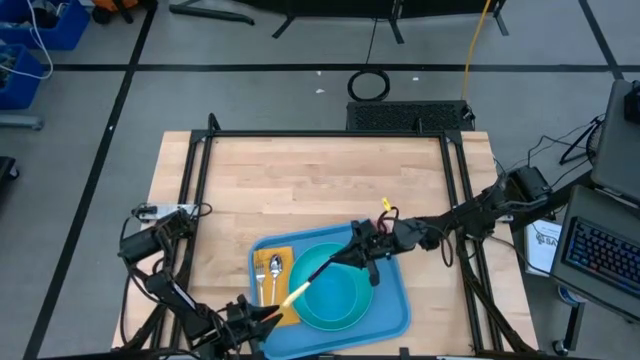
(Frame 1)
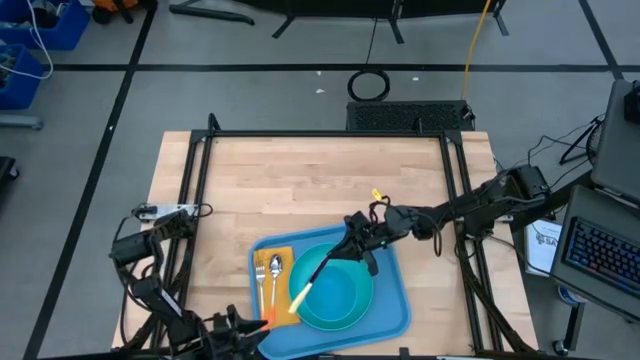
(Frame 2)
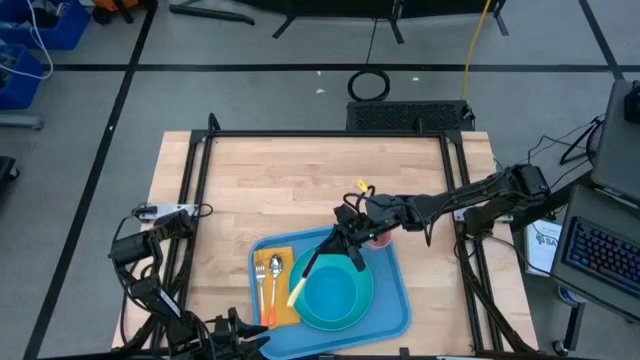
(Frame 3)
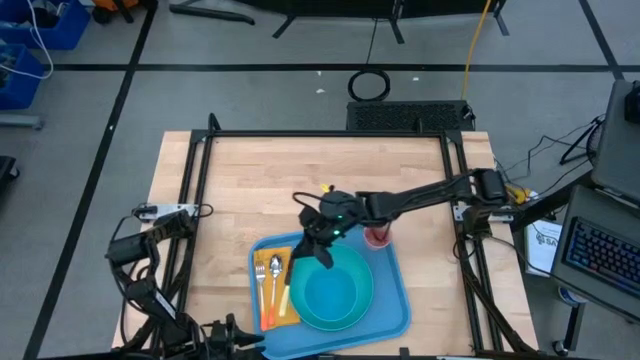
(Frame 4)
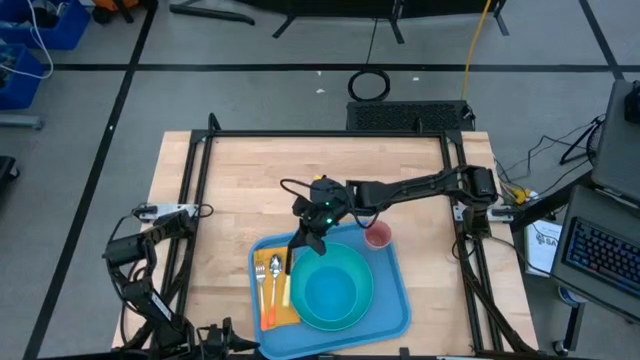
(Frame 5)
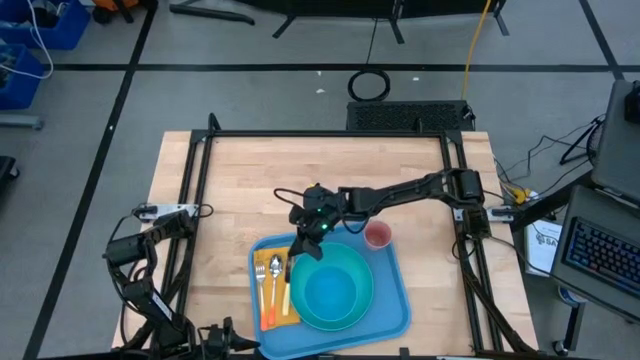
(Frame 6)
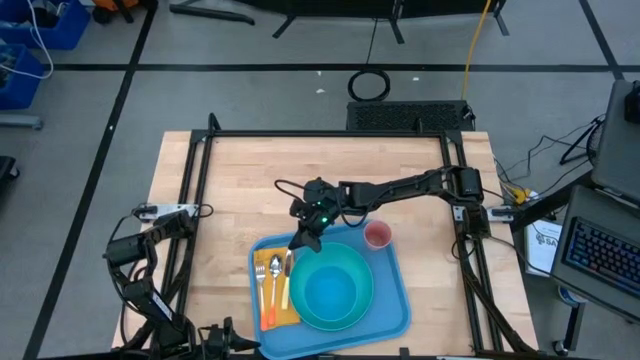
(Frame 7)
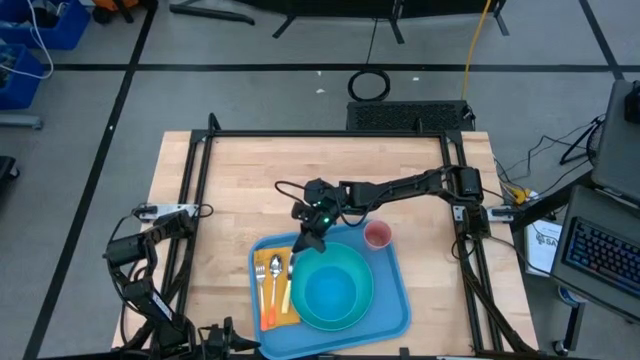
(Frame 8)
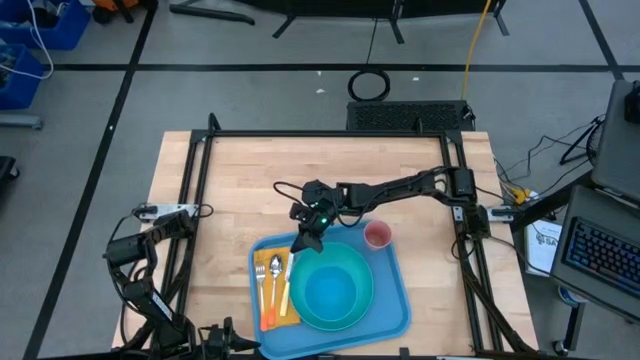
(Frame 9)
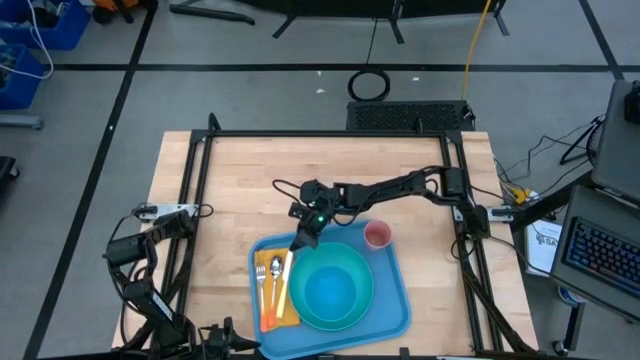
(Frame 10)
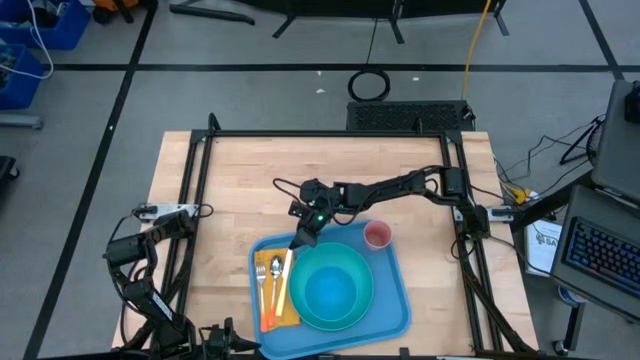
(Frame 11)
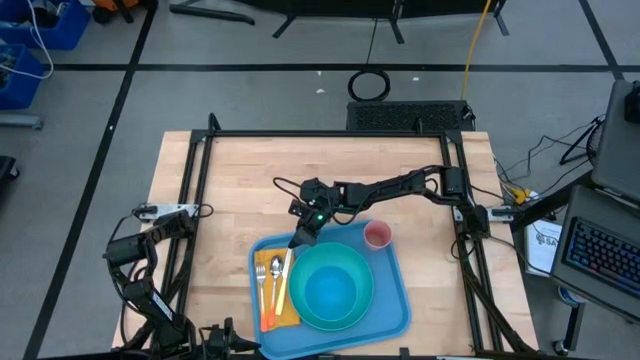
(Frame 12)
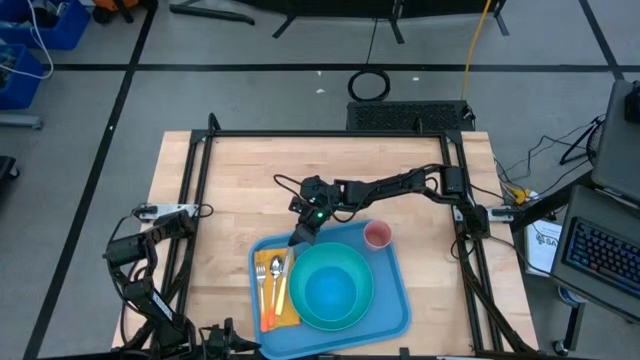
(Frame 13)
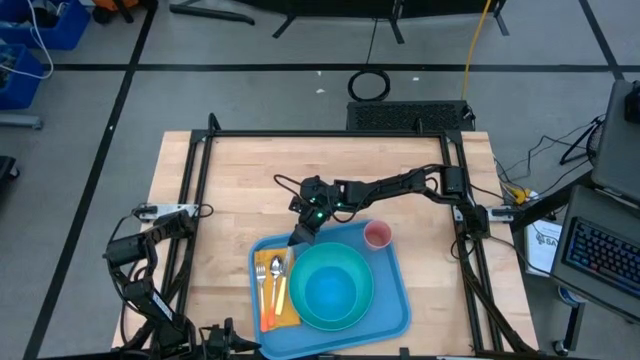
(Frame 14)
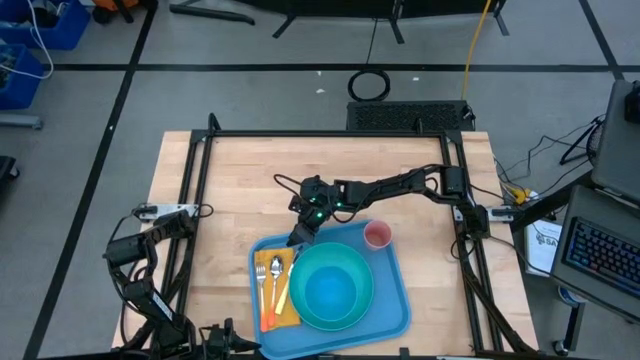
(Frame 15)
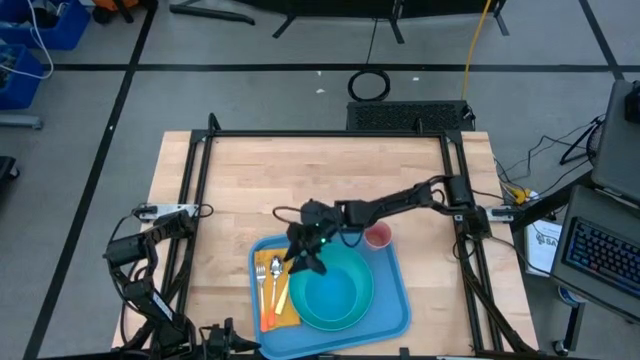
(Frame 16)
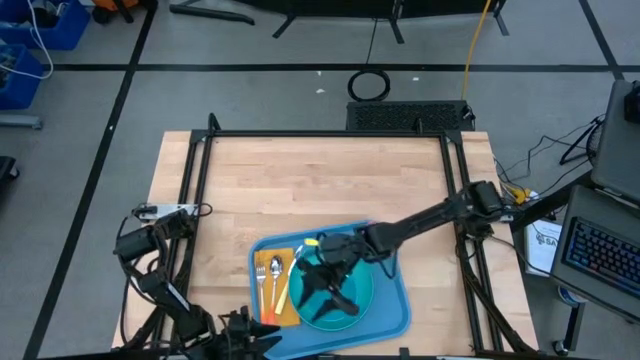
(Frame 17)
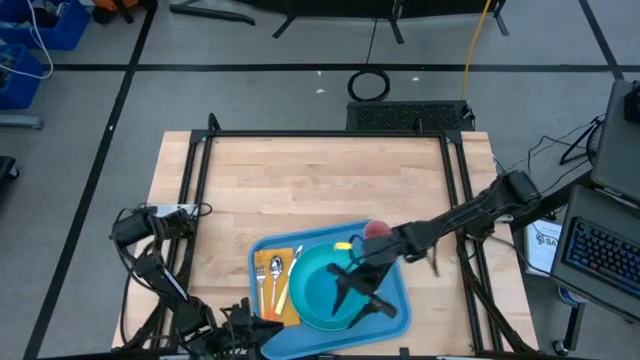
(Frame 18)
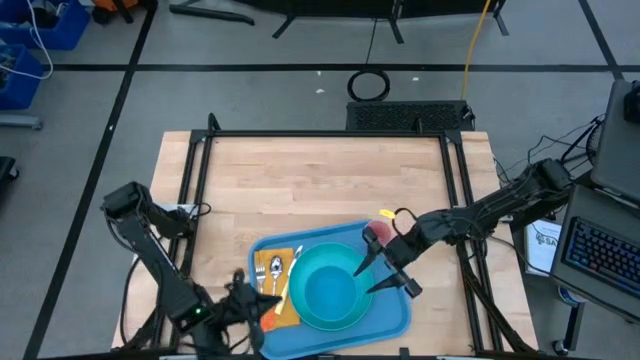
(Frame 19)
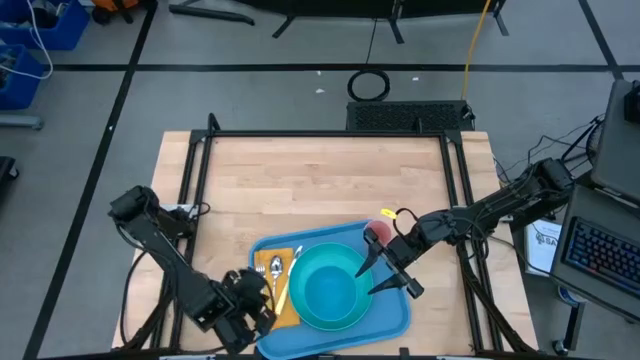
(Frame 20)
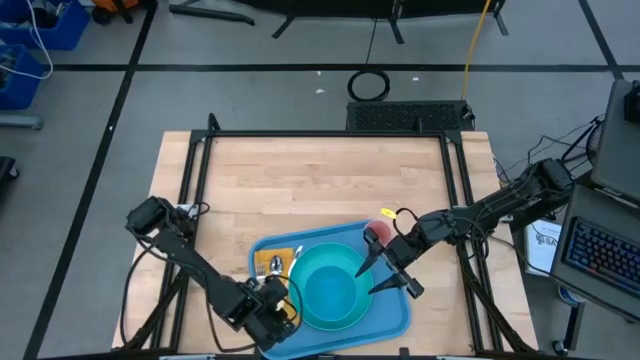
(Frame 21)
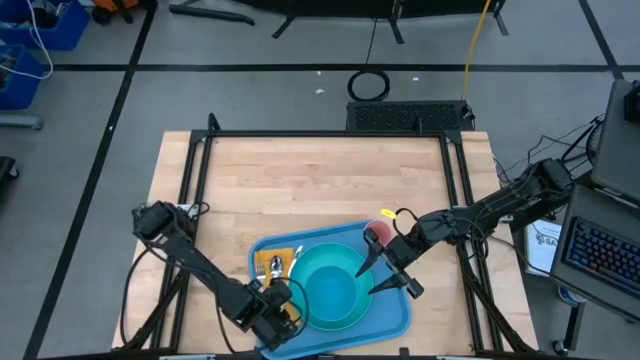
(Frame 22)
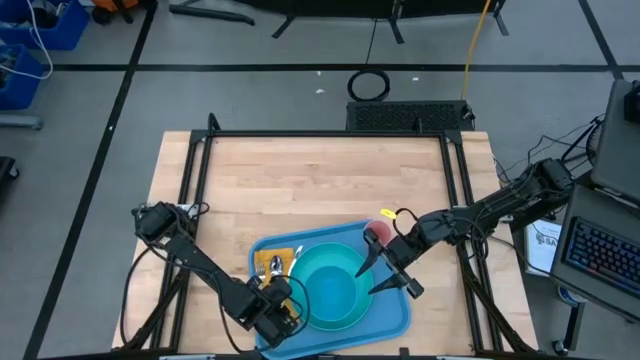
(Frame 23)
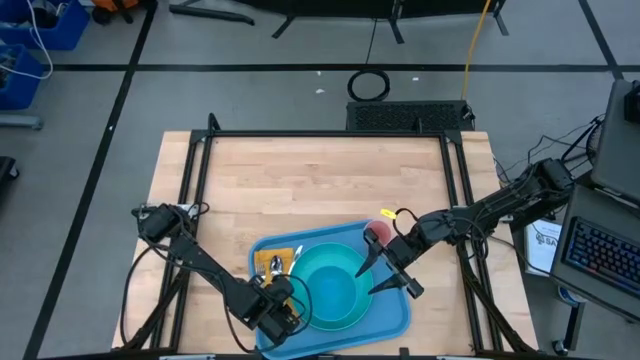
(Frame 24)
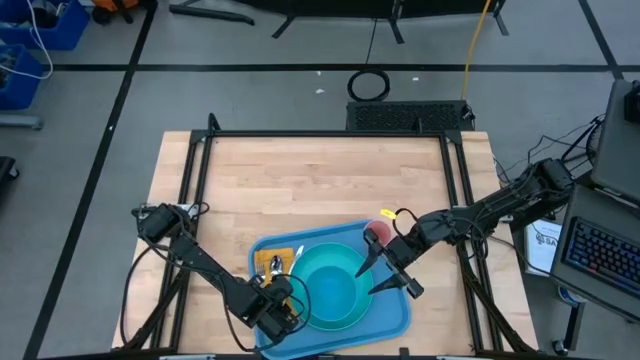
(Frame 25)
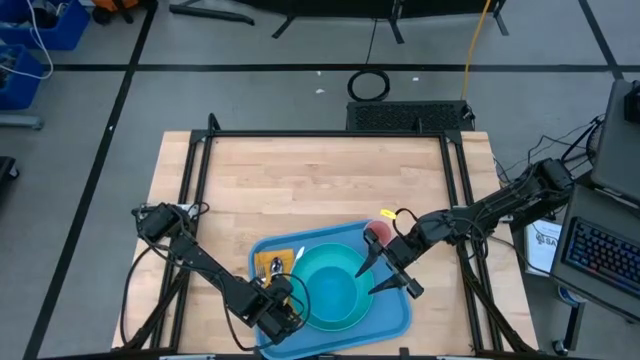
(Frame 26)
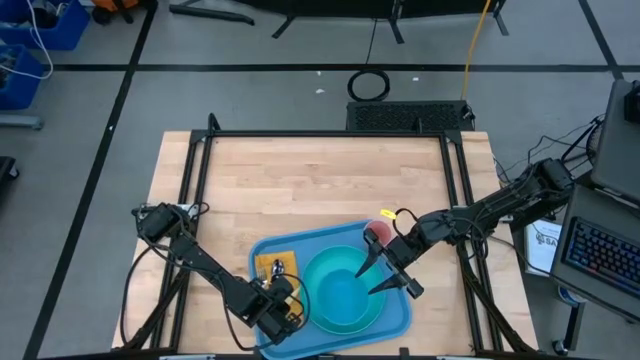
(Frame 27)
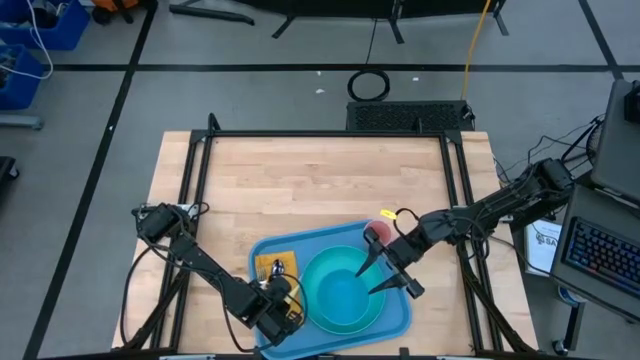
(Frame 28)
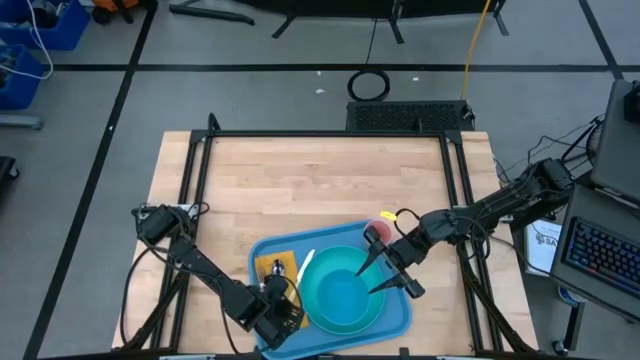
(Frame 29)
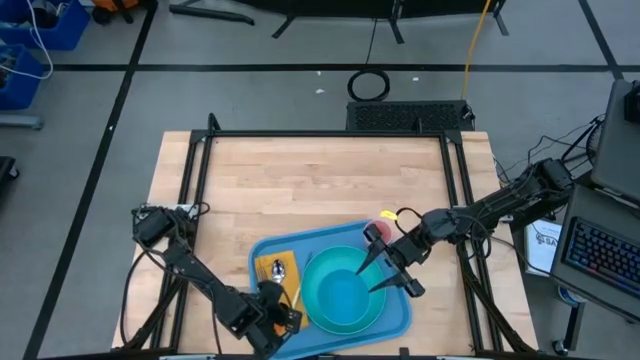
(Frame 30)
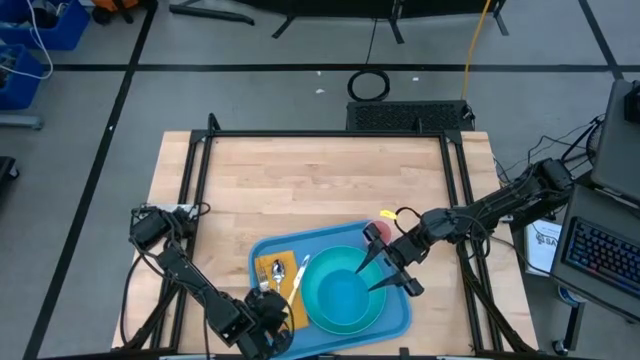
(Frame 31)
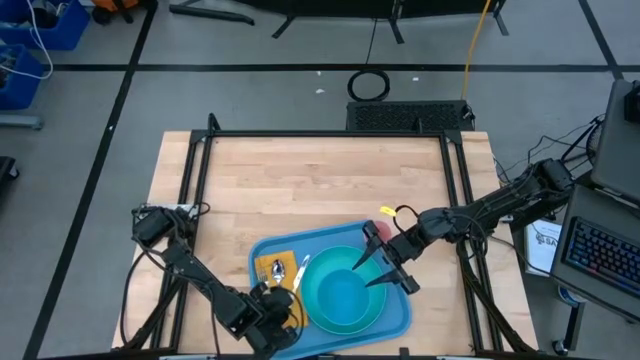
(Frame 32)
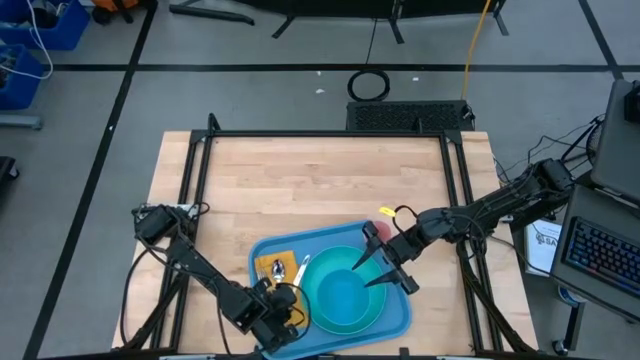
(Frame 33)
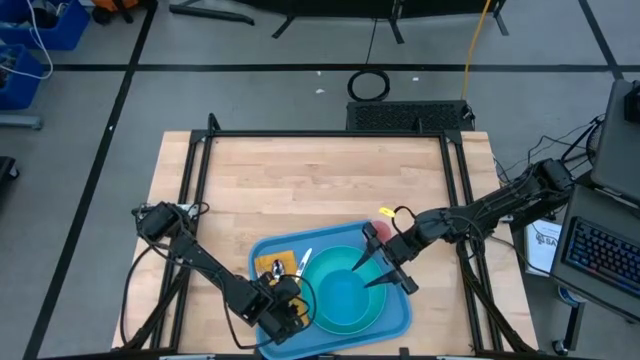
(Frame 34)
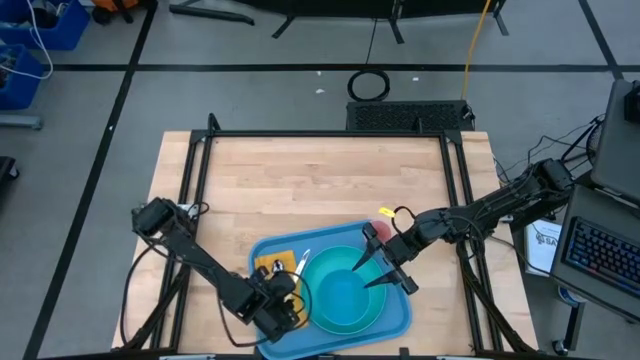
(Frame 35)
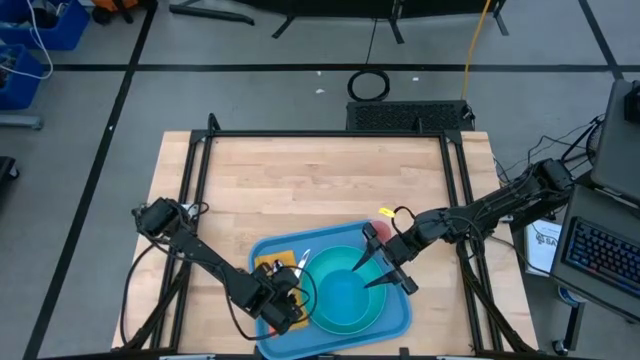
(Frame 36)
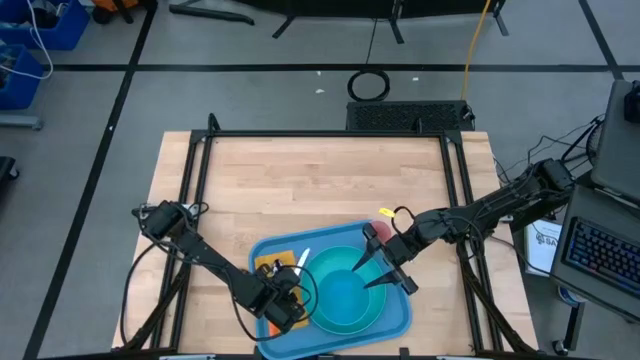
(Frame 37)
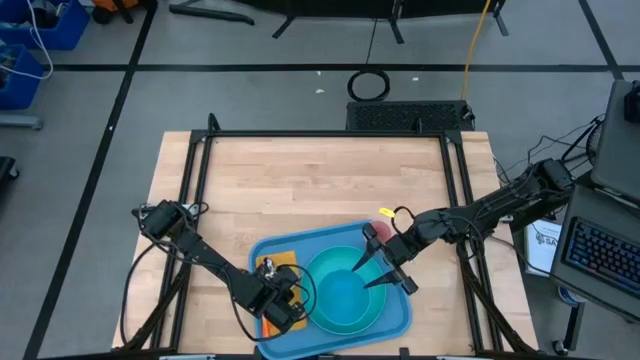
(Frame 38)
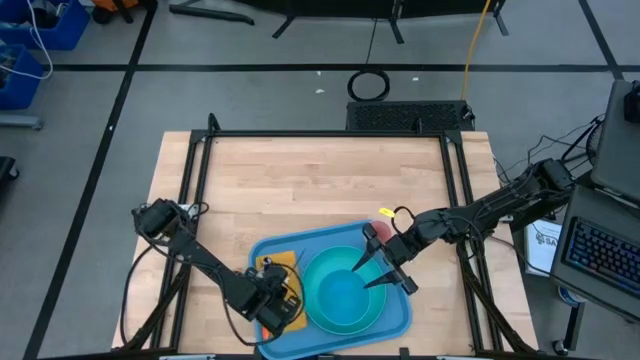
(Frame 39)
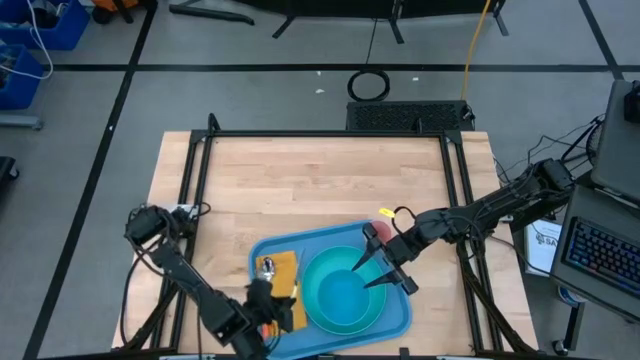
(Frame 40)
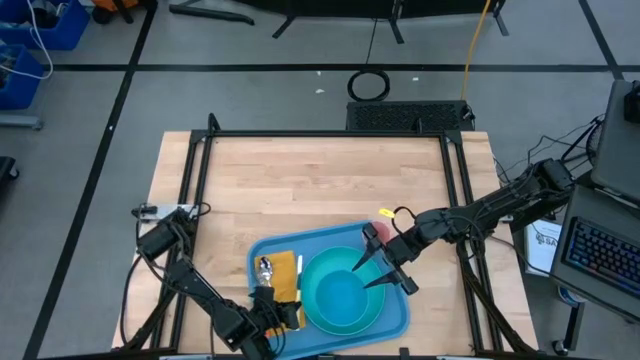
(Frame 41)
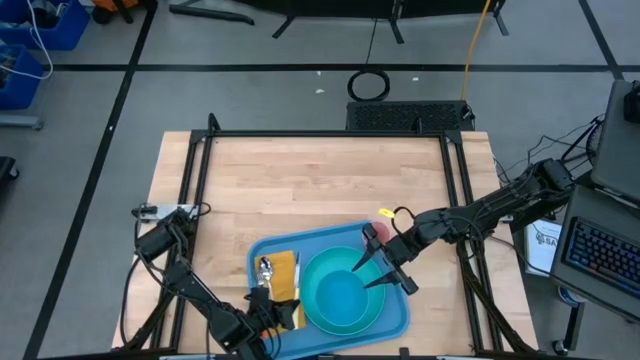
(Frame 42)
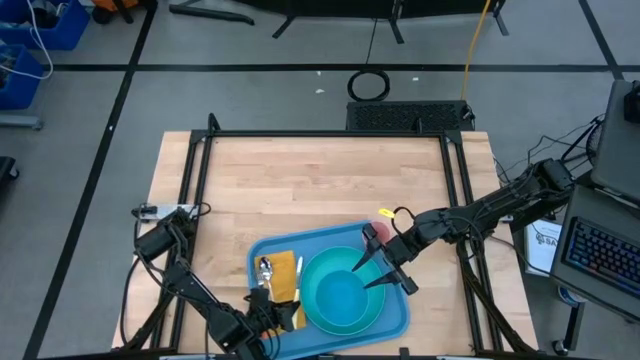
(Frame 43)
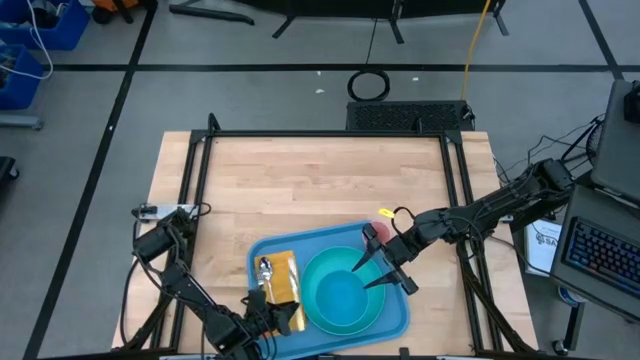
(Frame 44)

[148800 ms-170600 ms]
Task: Set up tray
Put the knife on top of the napkin to the right of the spoon
